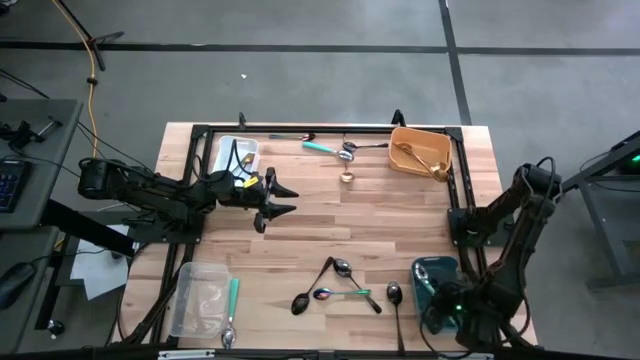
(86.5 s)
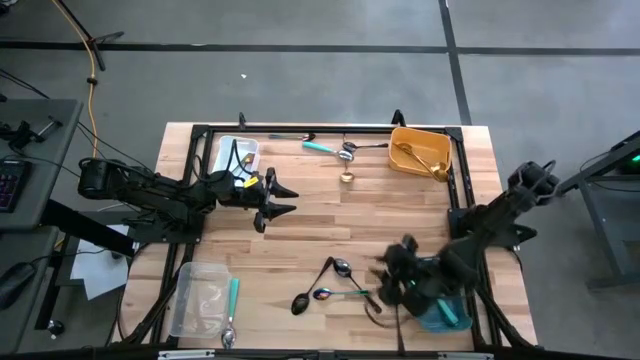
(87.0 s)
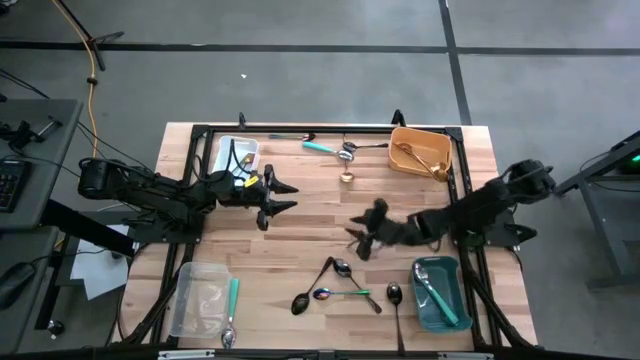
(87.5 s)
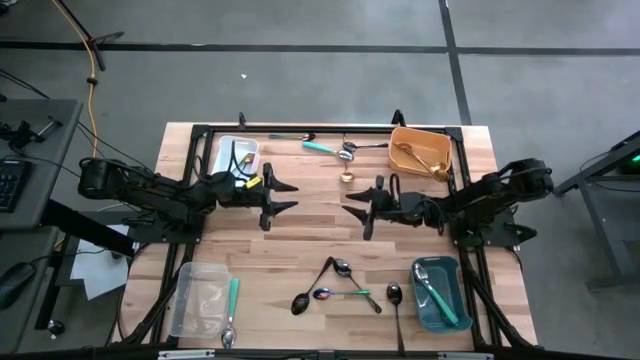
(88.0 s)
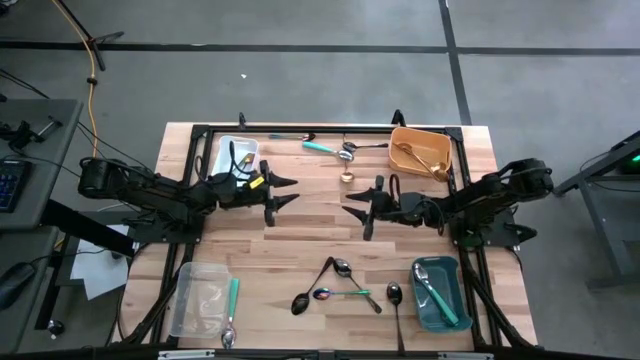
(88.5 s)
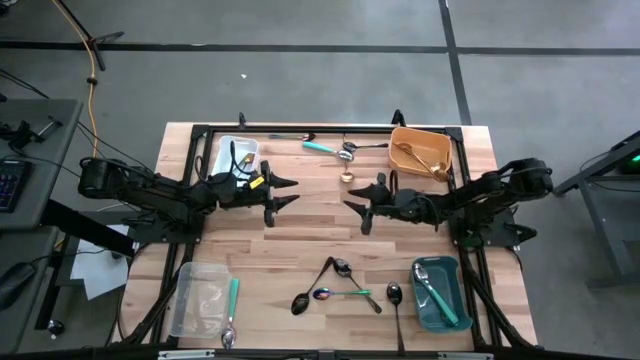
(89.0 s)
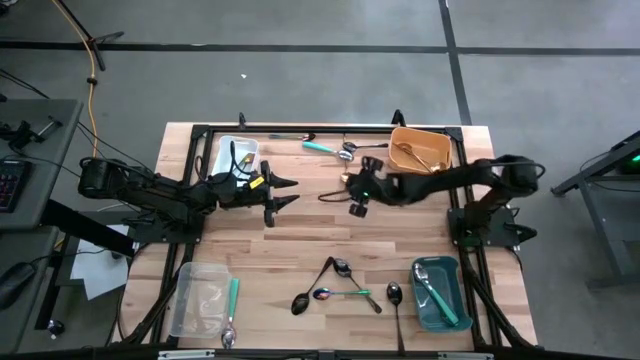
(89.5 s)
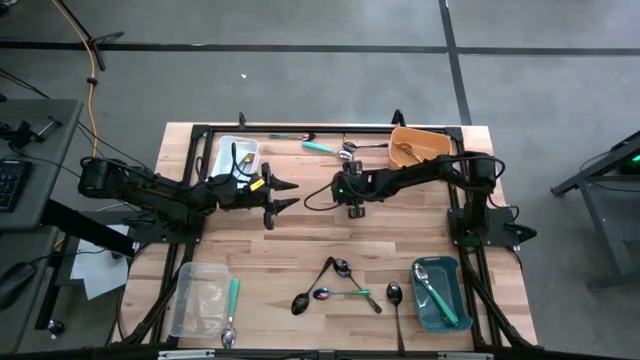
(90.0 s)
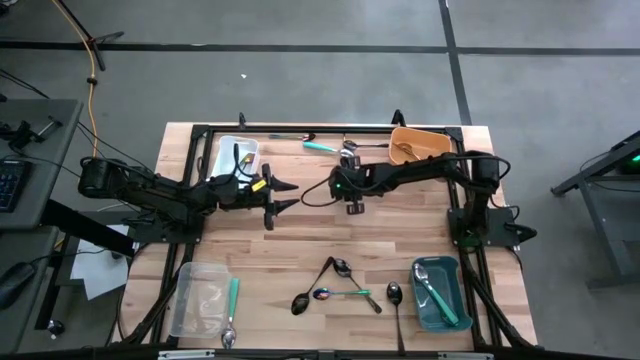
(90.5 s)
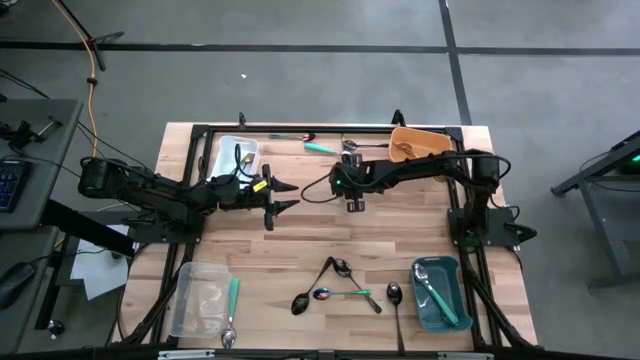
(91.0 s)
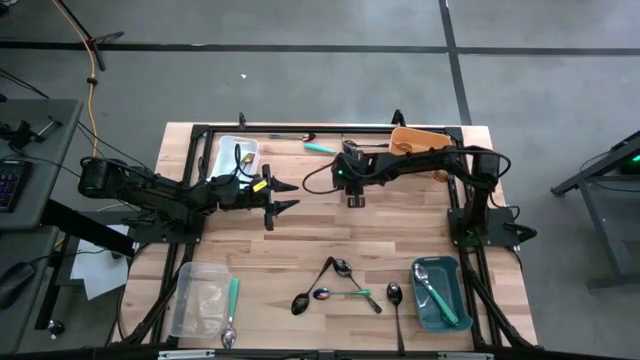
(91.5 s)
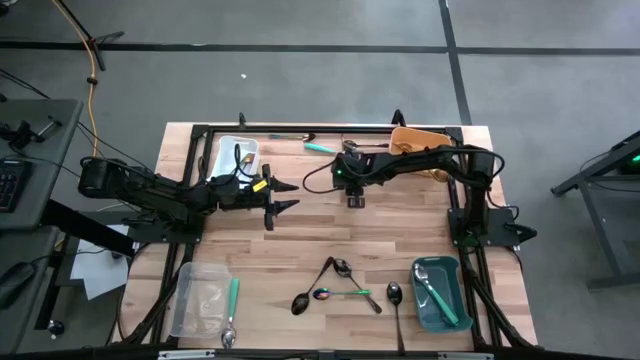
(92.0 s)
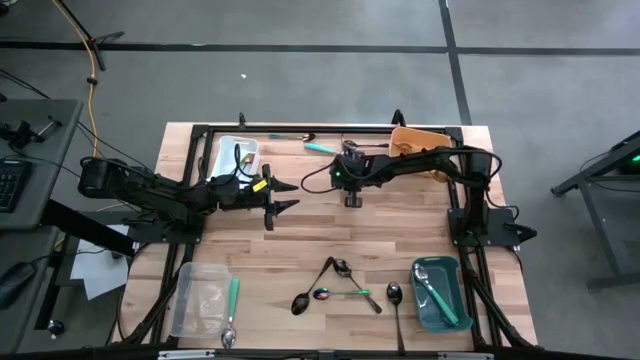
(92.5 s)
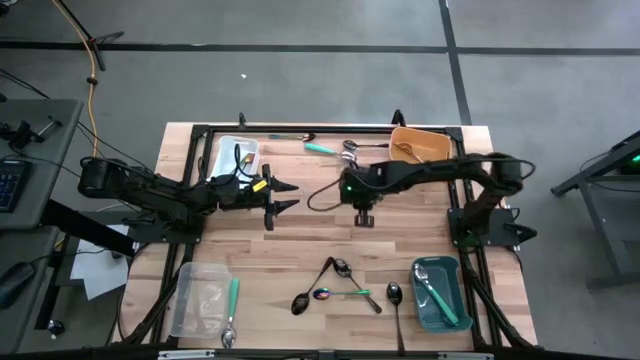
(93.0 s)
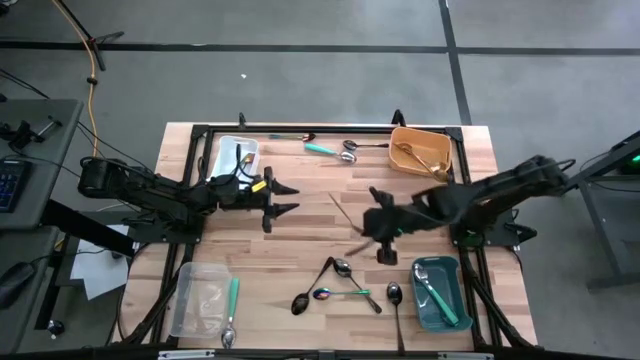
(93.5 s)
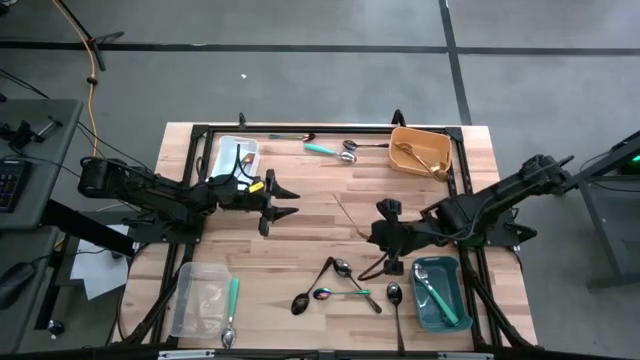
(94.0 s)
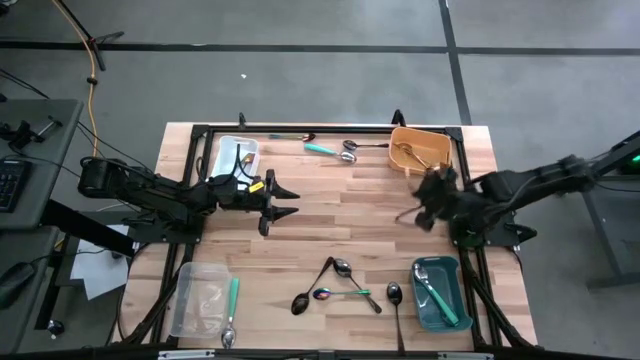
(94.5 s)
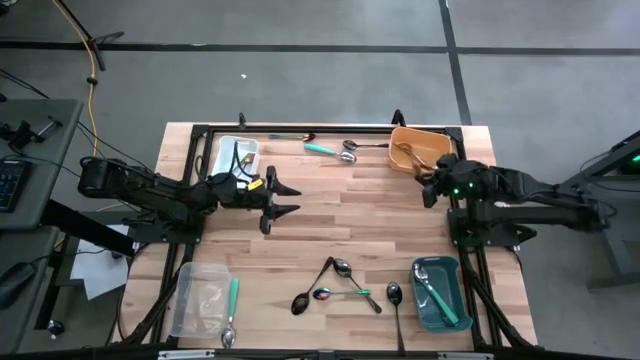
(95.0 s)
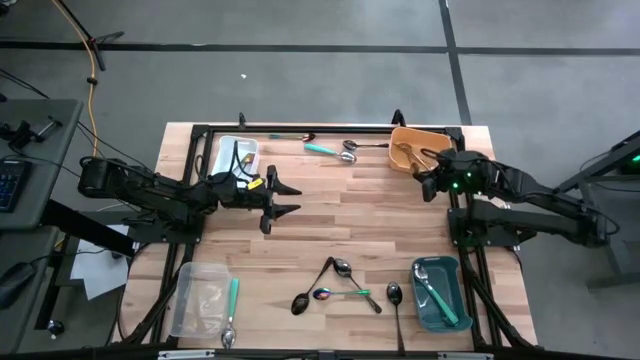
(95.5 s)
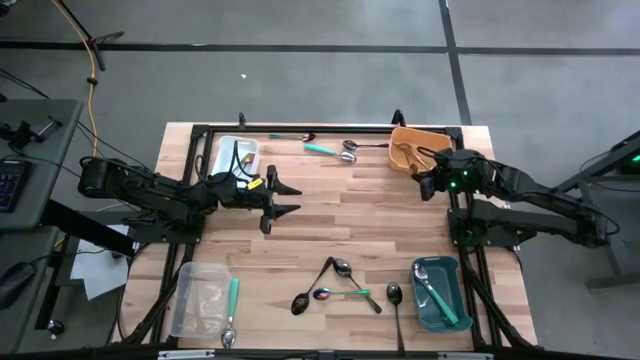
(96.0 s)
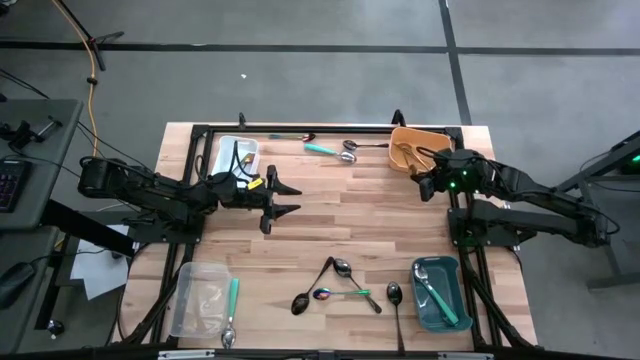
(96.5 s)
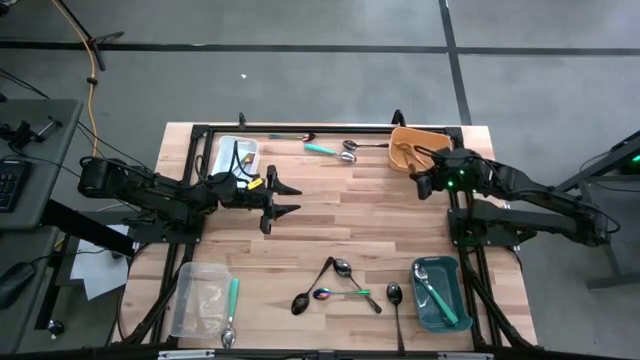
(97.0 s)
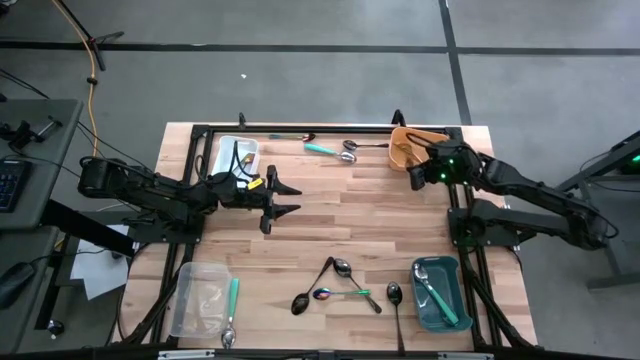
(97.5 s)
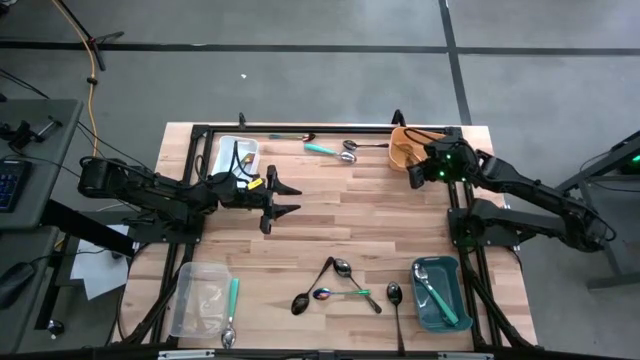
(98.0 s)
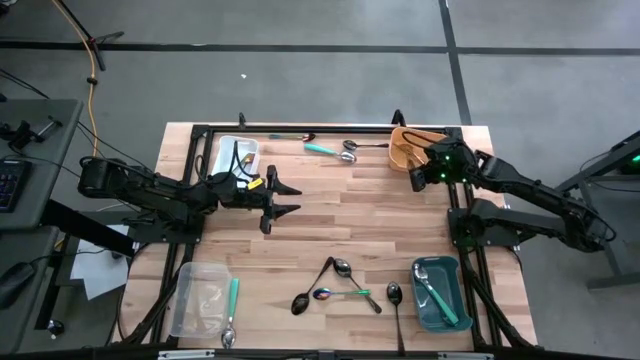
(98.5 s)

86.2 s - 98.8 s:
Task: Sort silverware by color (type)
Put the gold spoon into the yellow bin

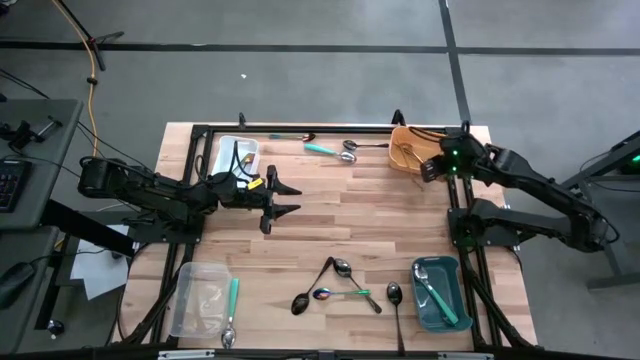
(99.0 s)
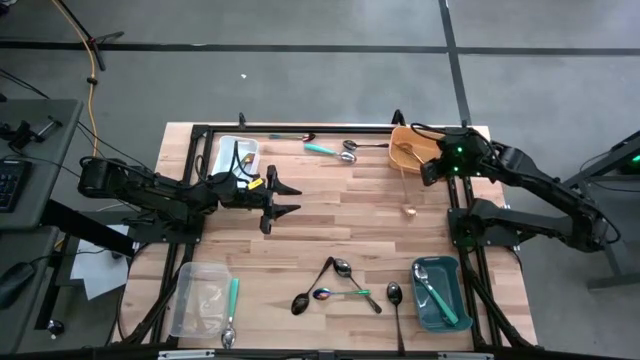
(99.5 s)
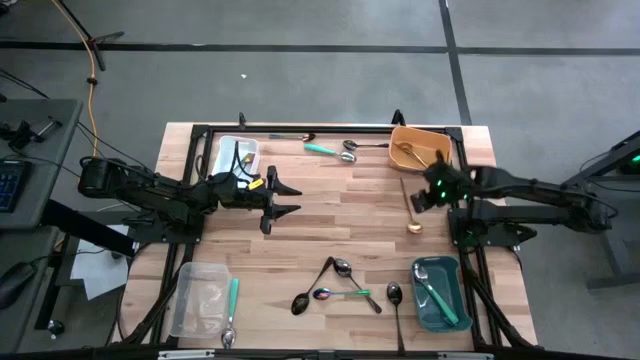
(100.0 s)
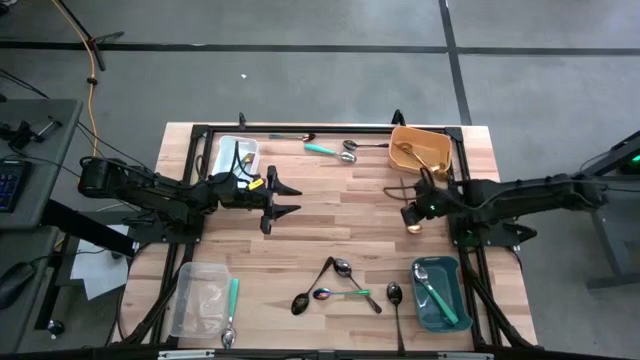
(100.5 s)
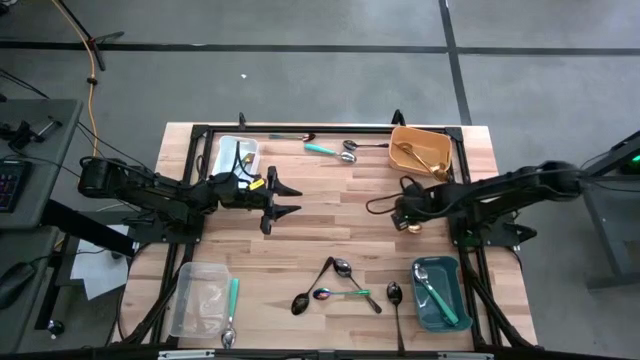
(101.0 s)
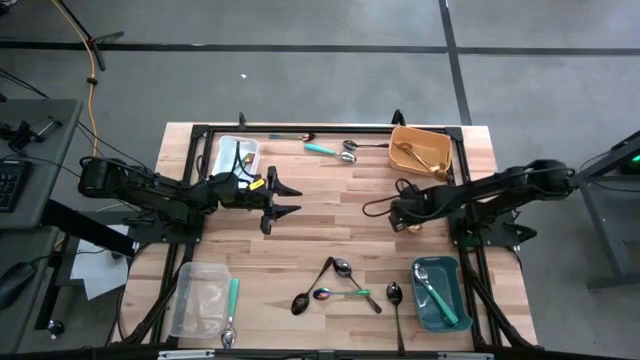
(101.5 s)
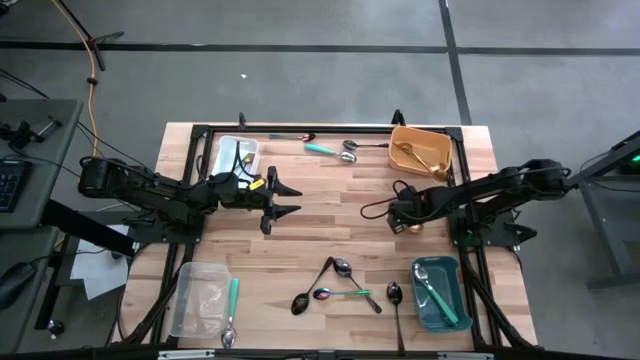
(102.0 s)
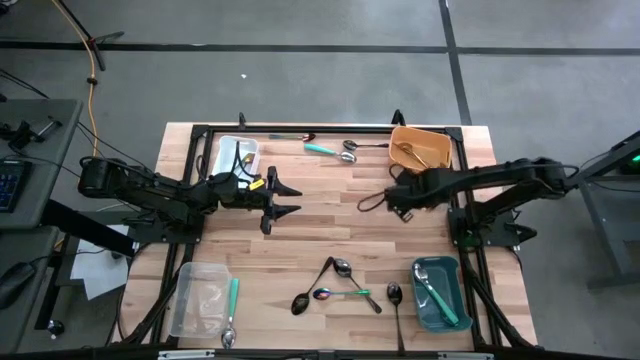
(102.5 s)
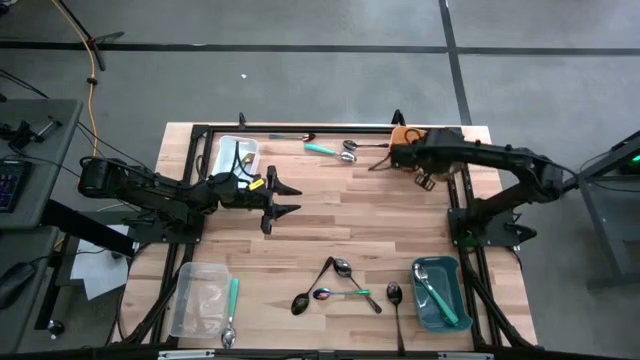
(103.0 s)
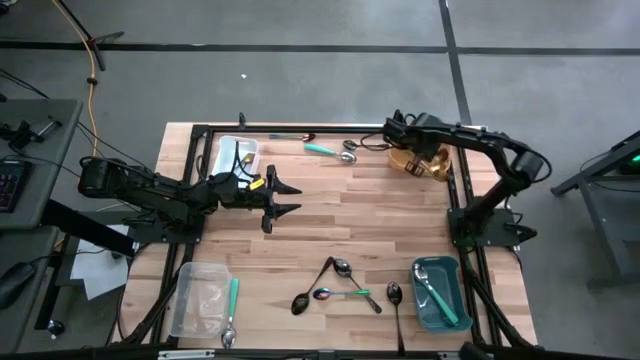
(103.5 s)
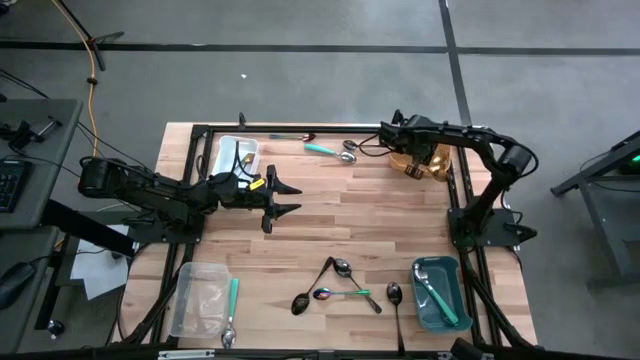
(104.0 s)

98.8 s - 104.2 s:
Put the gold spoon into the yellow bin
